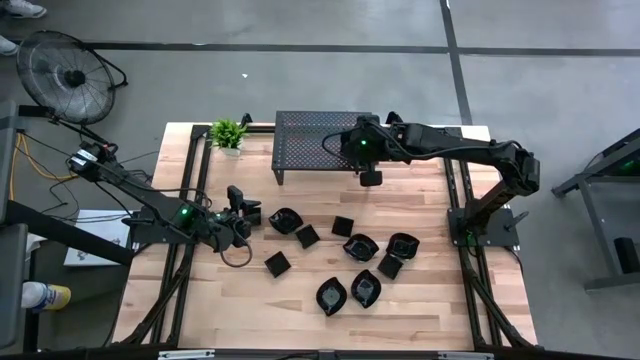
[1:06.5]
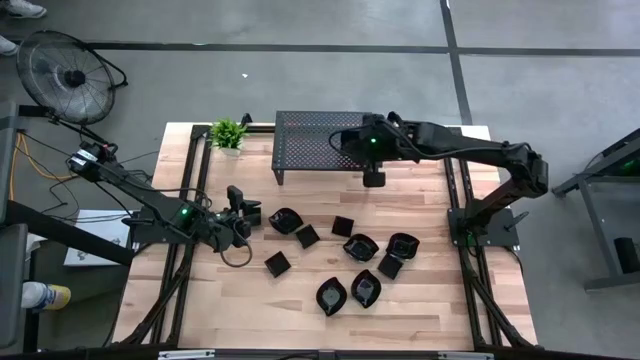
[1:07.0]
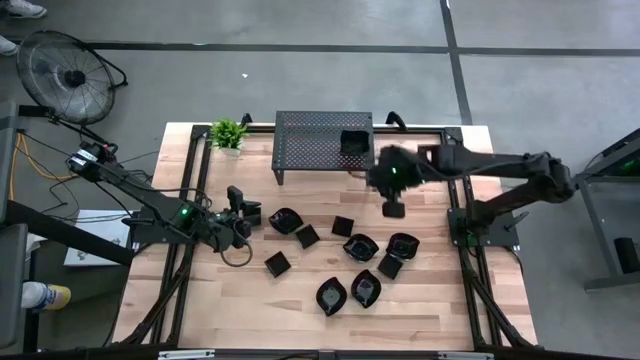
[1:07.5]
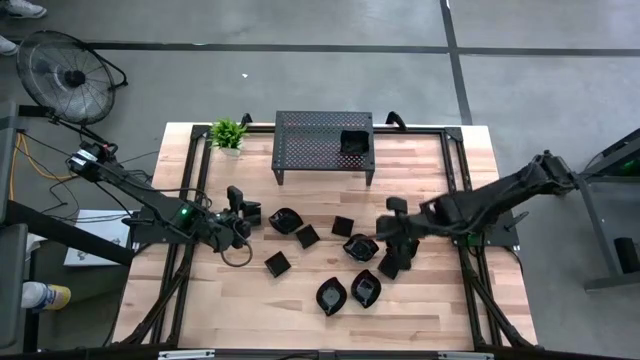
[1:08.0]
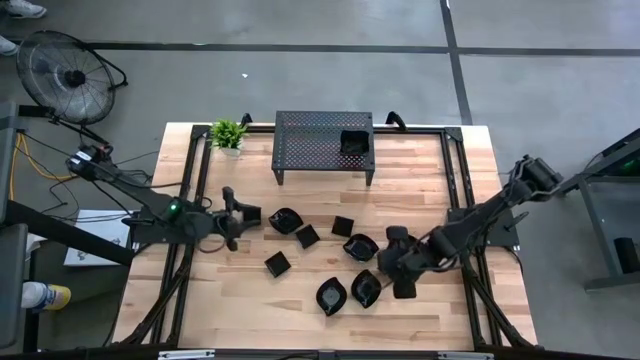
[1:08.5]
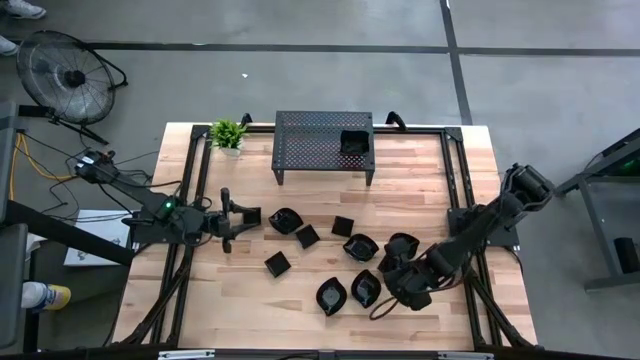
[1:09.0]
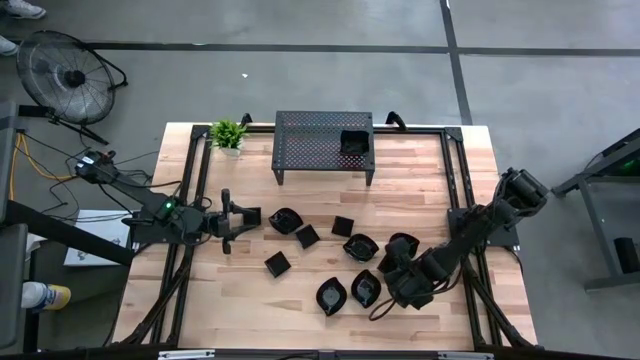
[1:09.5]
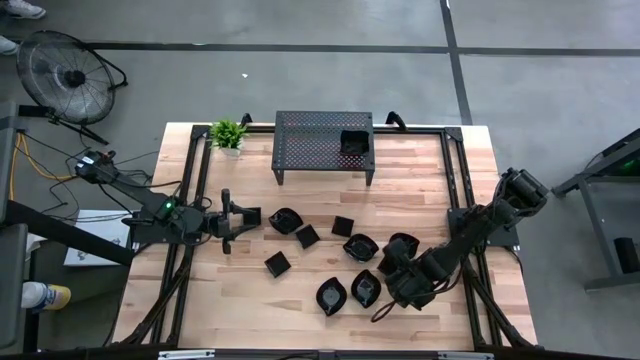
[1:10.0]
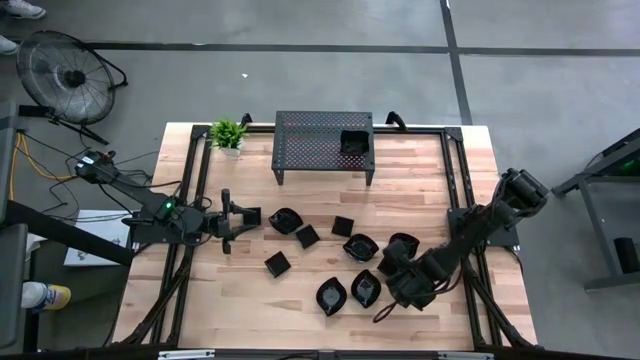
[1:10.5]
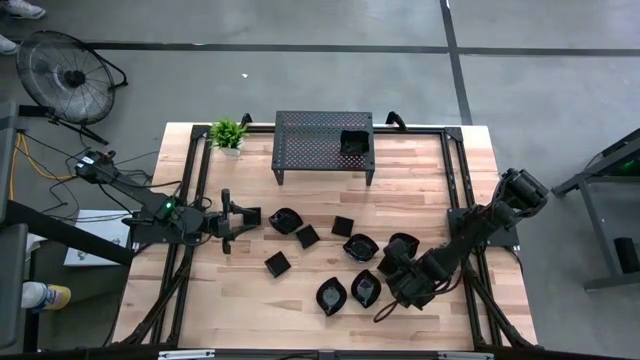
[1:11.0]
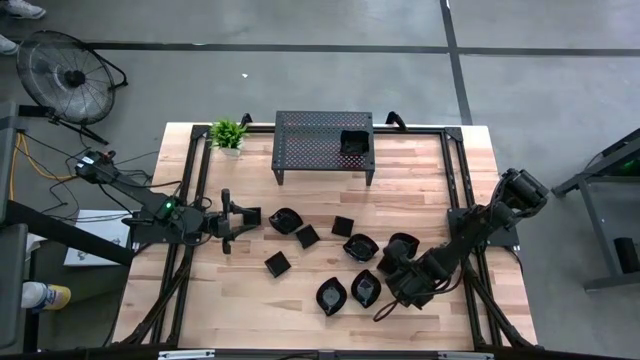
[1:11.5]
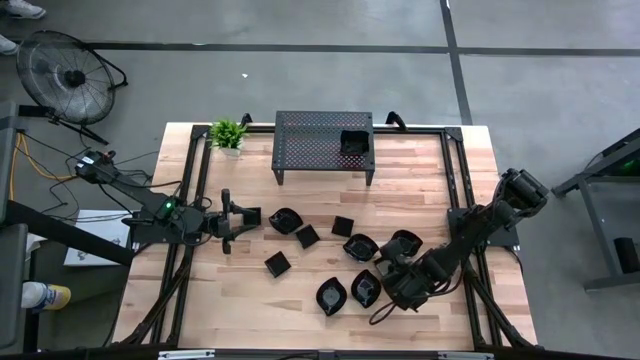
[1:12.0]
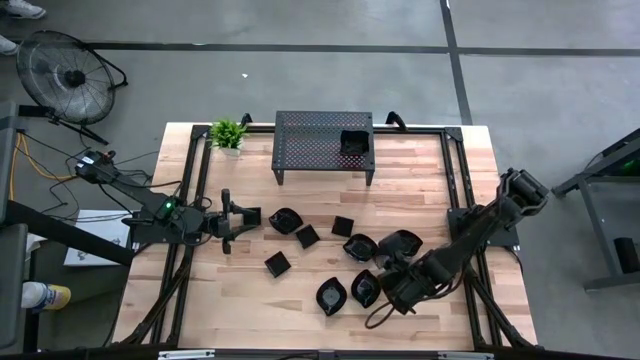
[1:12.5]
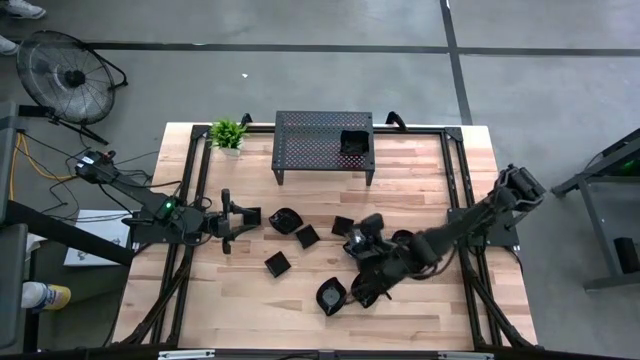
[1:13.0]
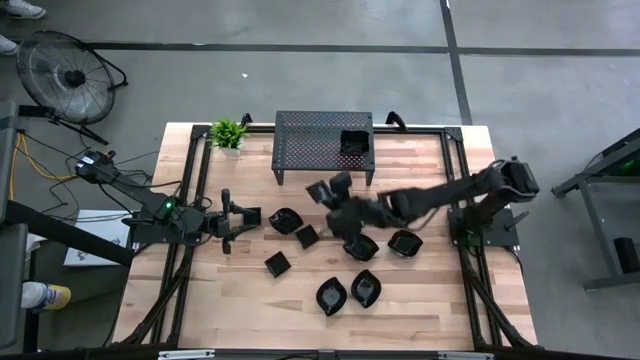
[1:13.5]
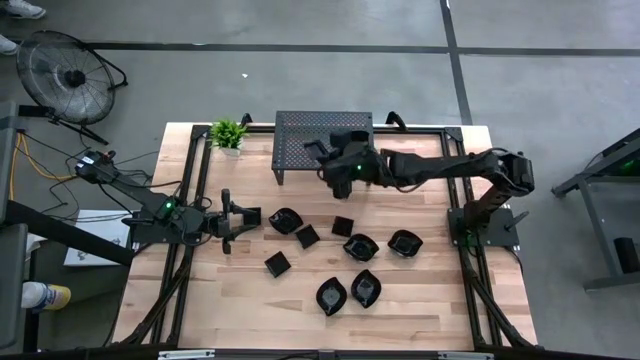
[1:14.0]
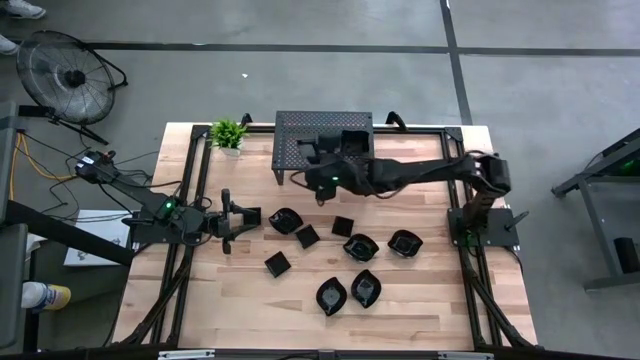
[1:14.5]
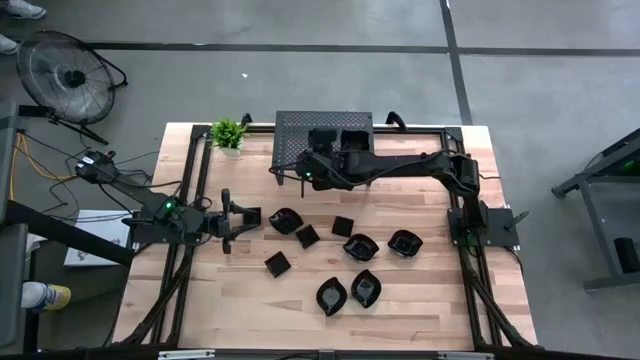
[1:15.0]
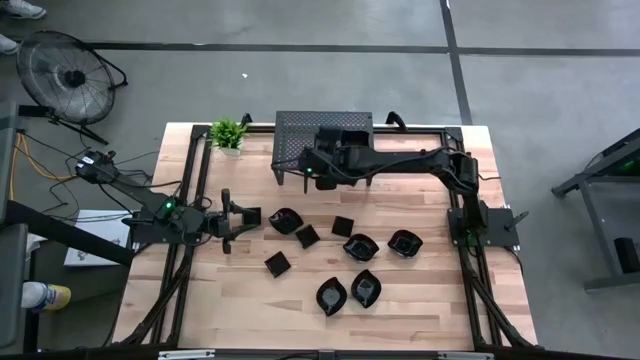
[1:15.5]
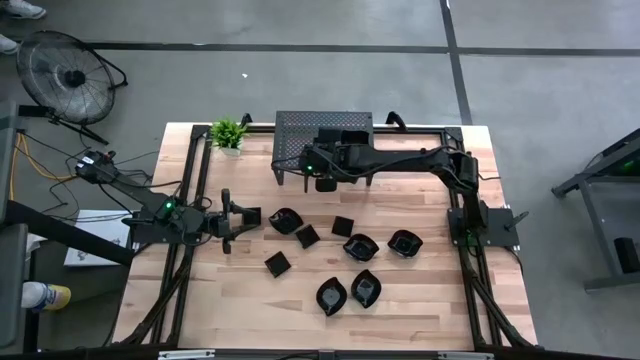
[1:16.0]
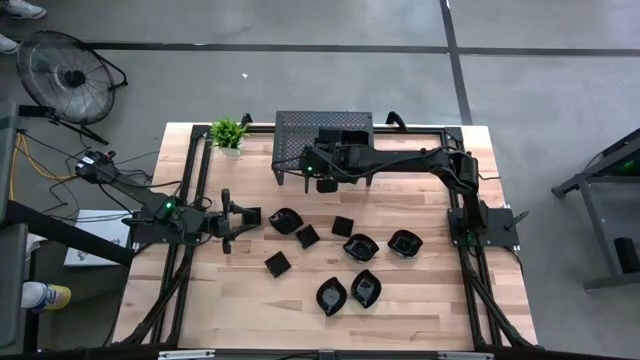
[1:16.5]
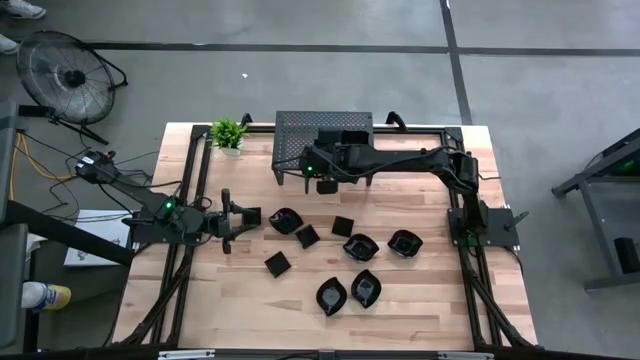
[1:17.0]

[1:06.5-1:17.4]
Task: Pick & Place Mini shaped plates
Put the square plate on the shelf

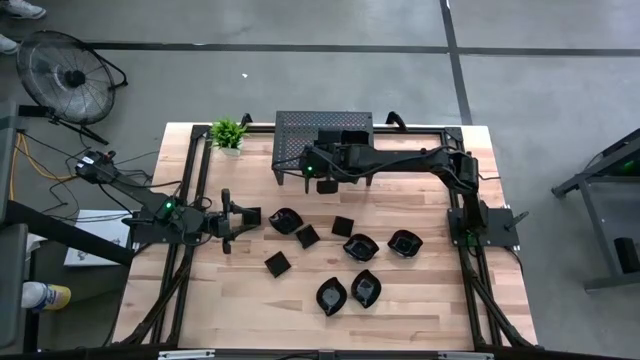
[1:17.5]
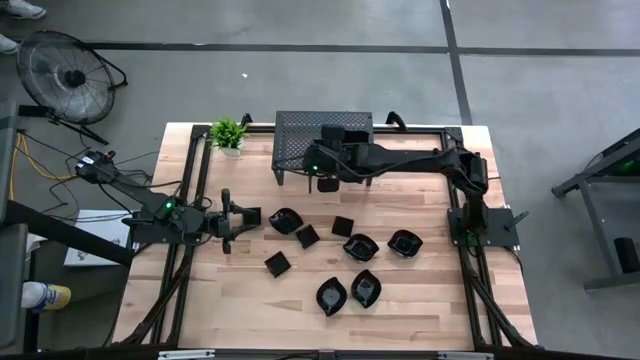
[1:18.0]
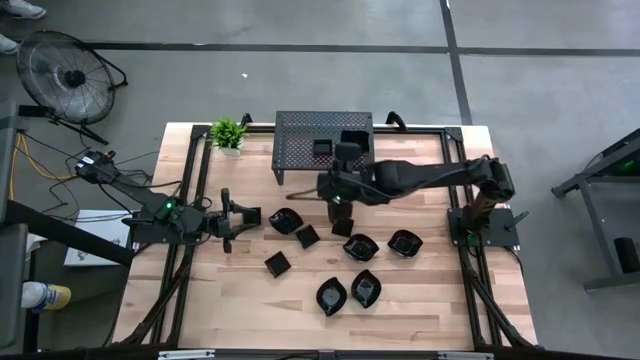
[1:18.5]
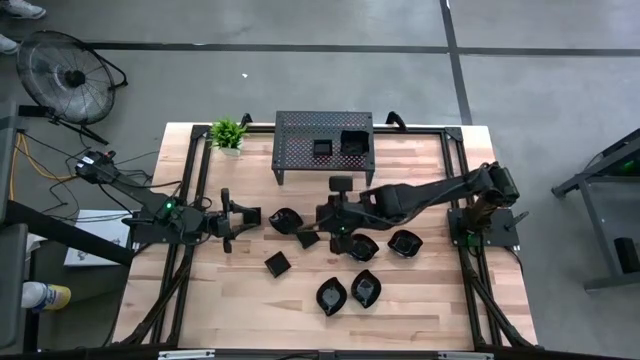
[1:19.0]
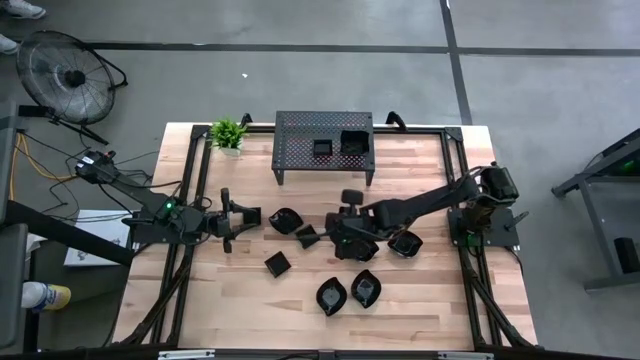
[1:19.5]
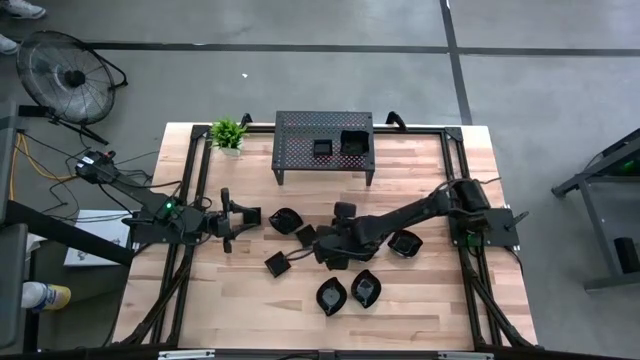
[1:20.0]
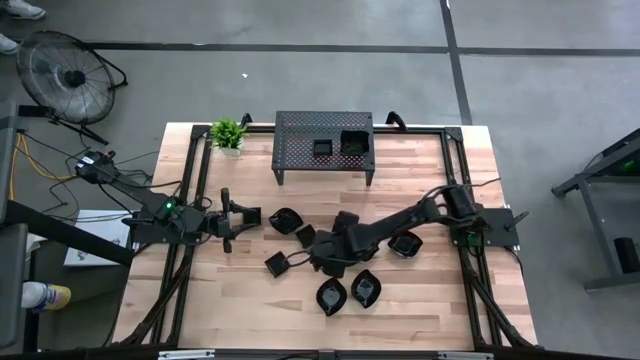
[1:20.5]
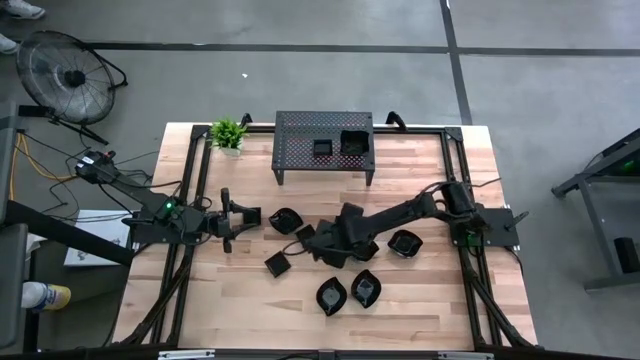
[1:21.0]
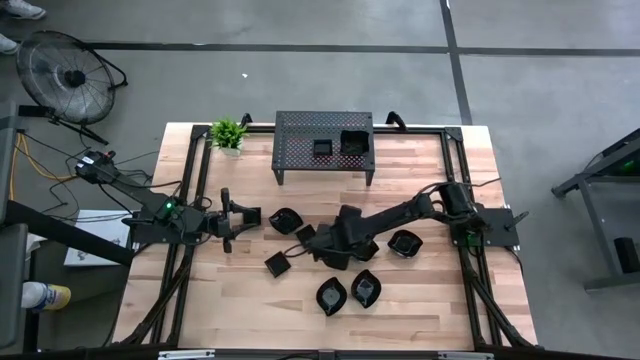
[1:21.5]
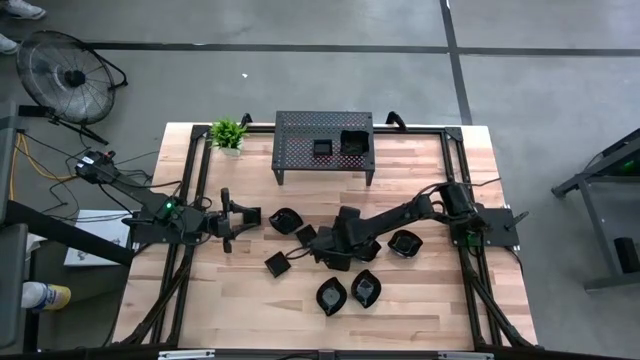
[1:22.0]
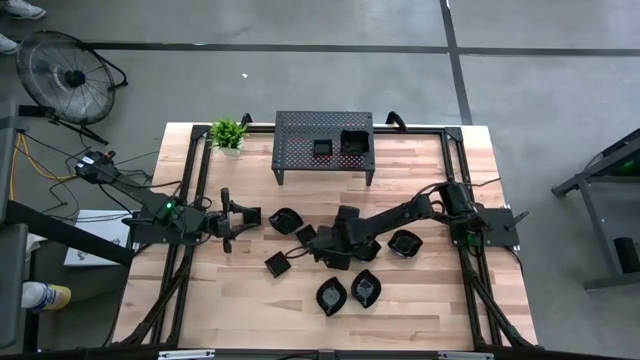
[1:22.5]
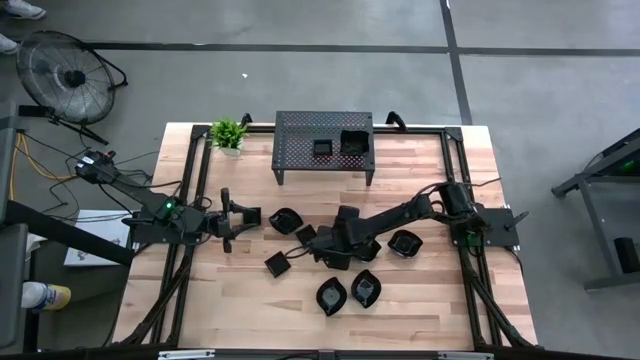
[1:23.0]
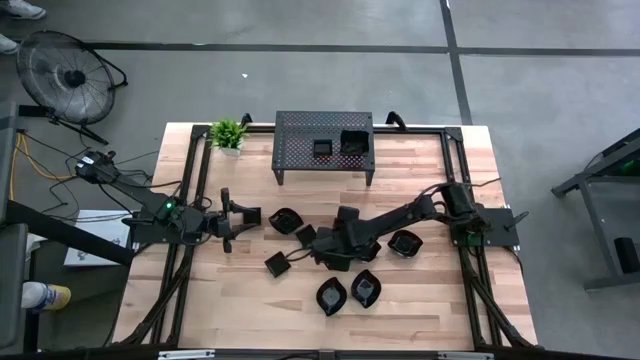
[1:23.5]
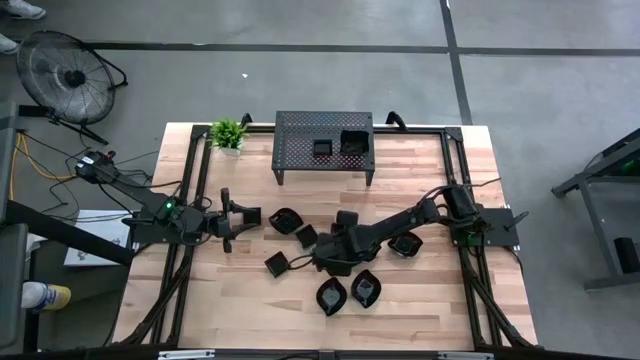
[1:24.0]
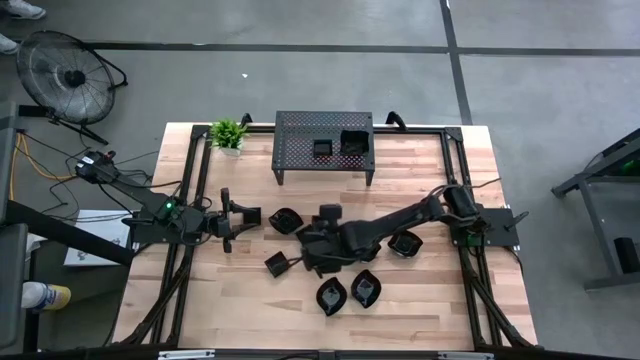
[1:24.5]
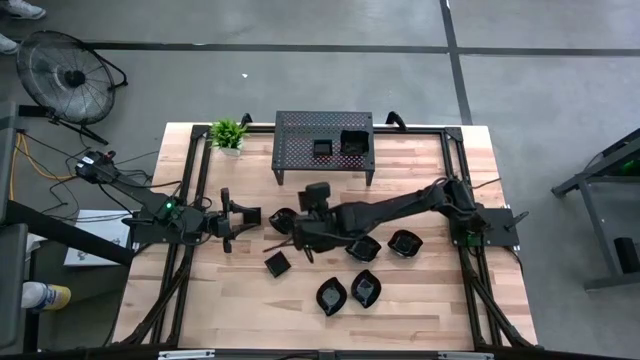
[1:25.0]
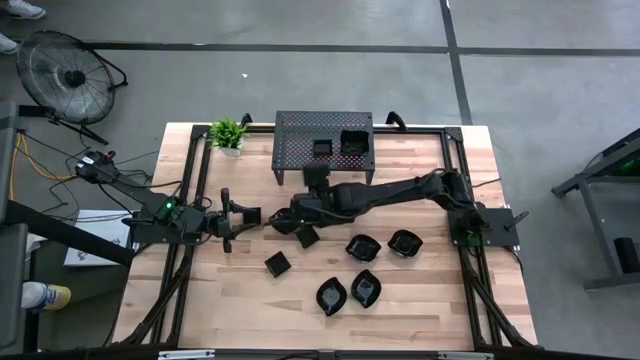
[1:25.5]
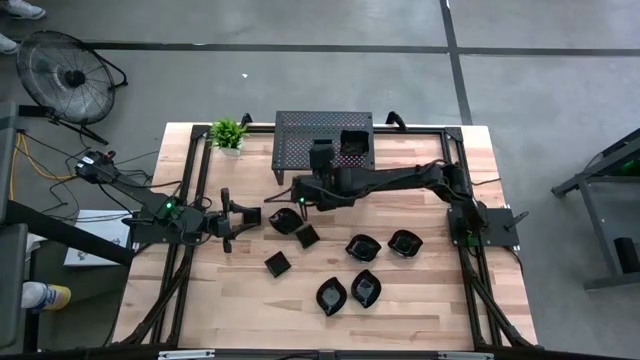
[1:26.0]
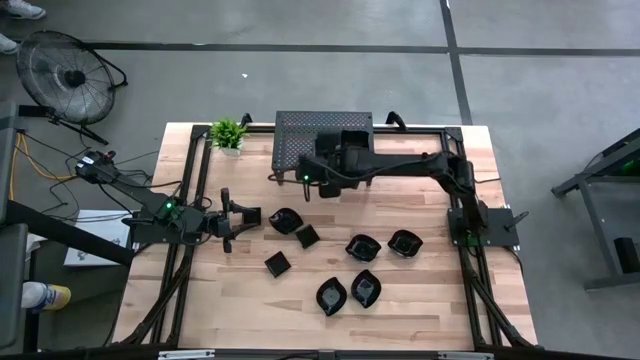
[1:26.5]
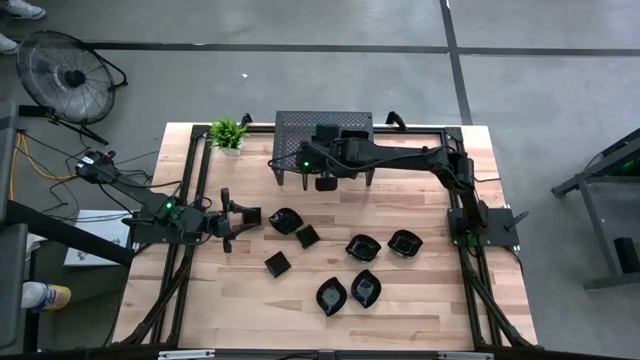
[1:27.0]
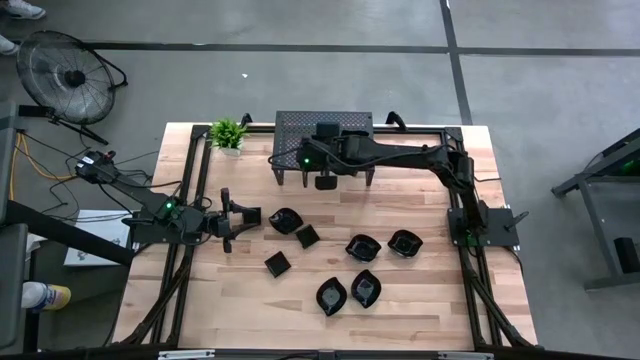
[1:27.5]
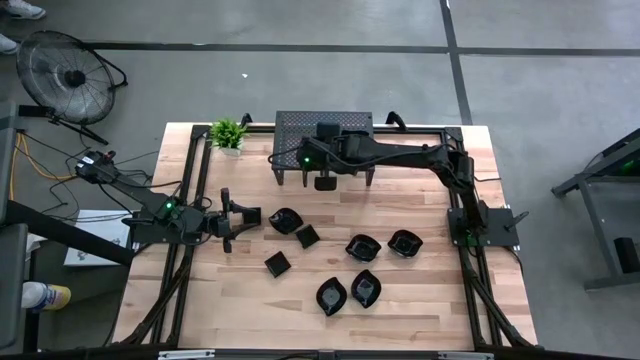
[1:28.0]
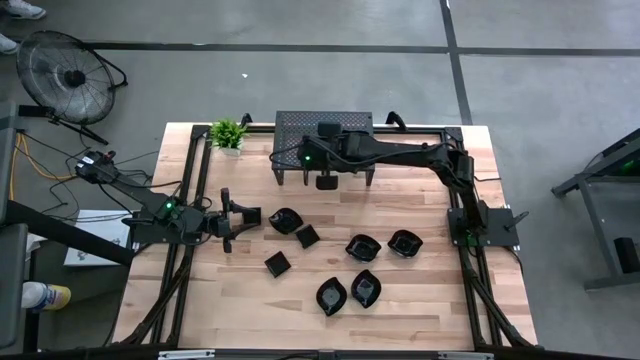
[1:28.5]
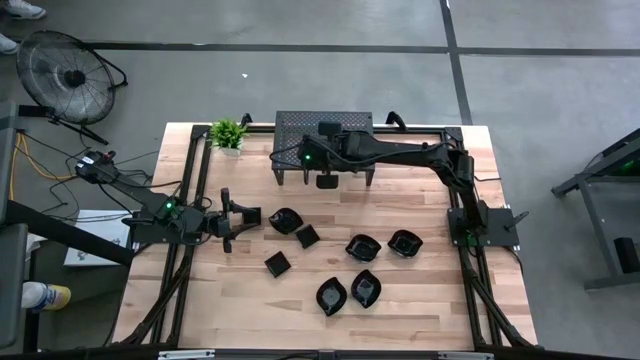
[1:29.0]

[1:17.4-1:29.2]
Stack the square plate on top of the square plate on the shelf
